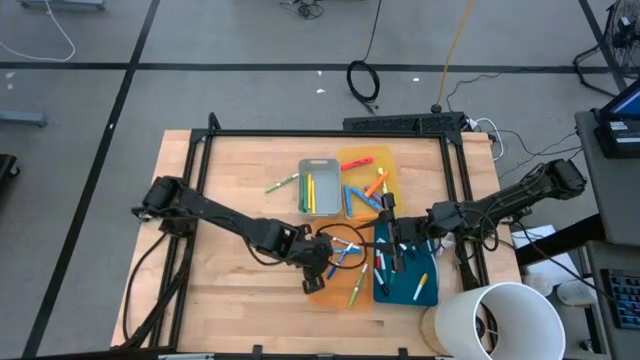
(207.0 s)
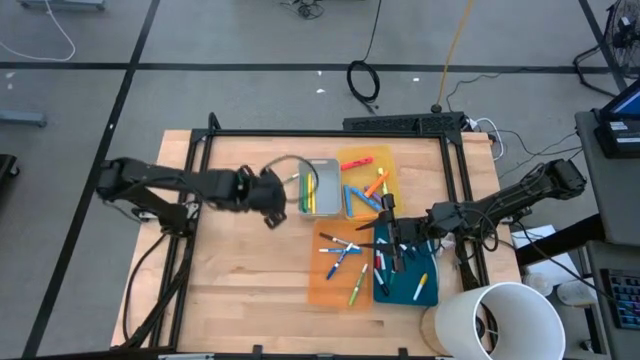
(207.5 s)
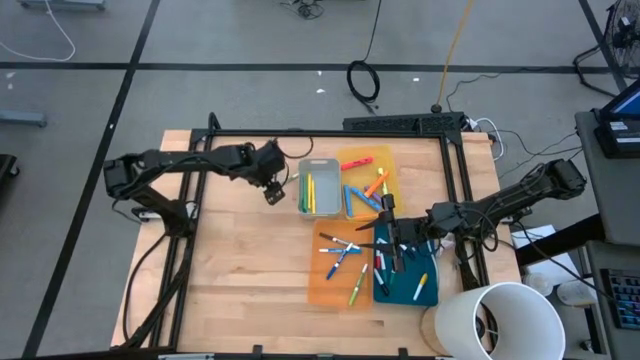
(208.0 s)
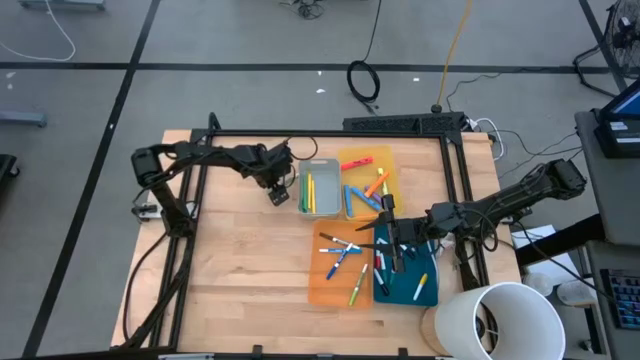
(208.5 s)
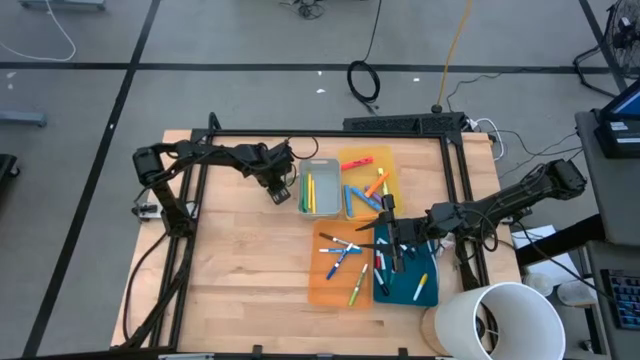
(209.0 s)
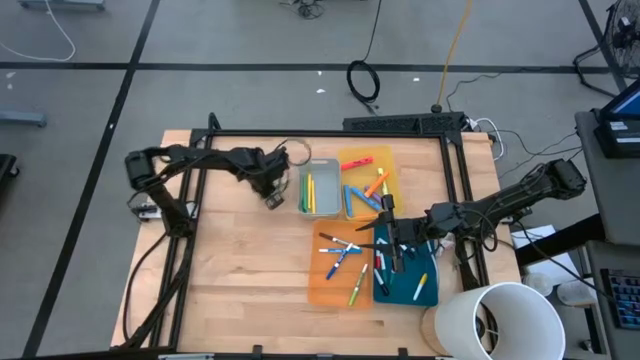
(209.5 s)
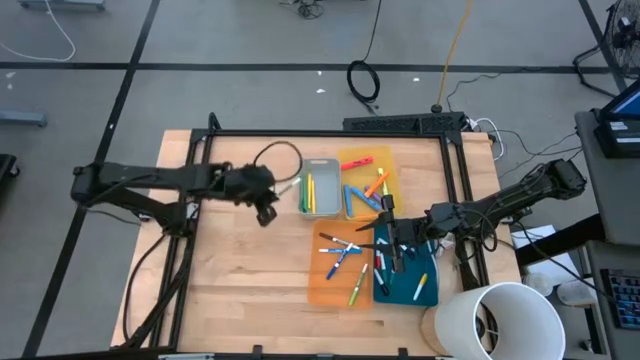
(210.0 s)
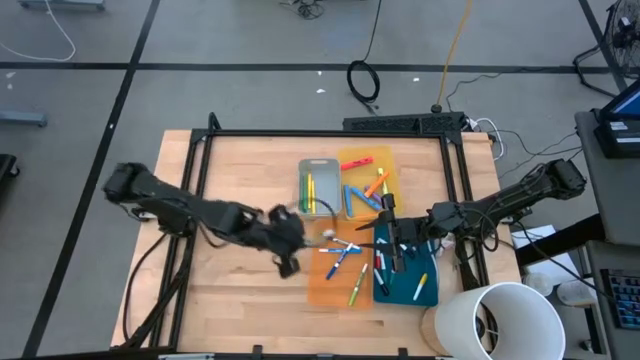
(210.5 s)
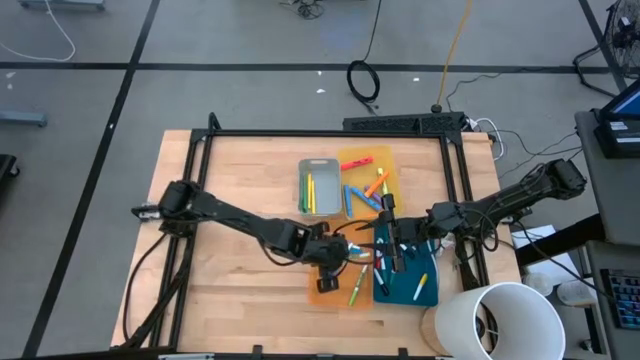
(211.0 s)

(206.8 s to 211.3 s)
Task: Pick & Place Markers
Put the green marker pen into the orange bin

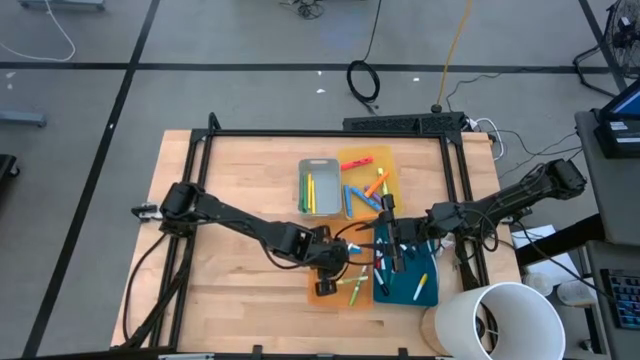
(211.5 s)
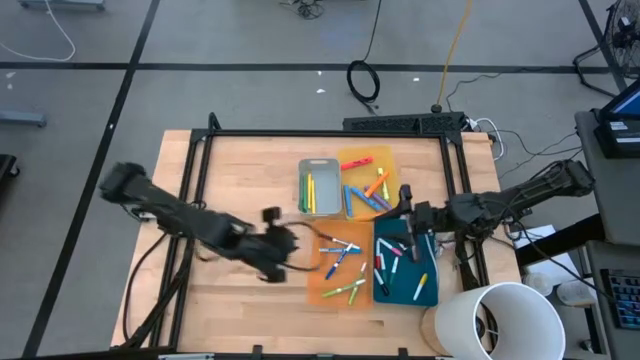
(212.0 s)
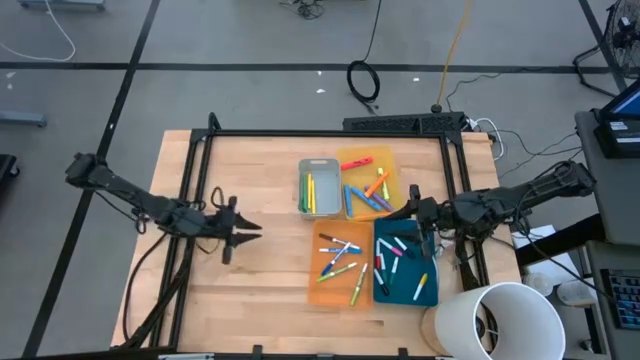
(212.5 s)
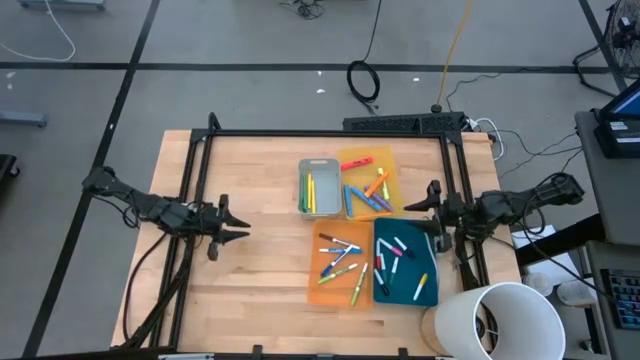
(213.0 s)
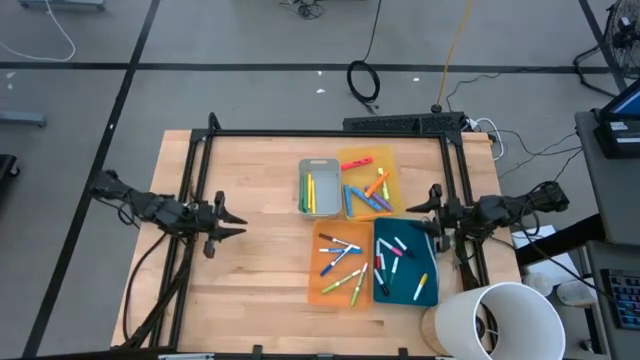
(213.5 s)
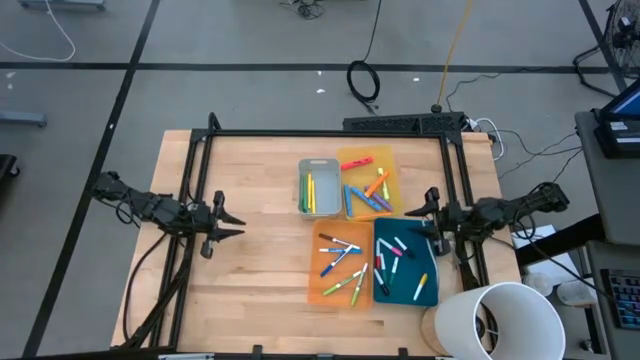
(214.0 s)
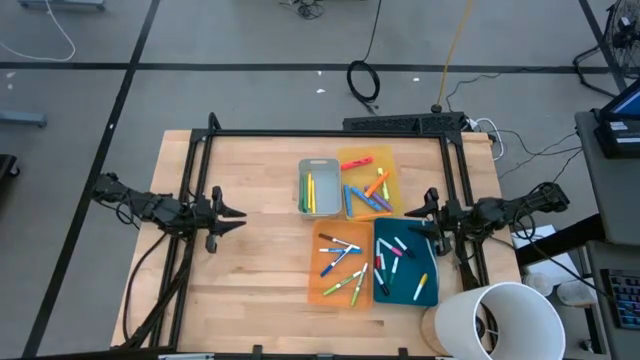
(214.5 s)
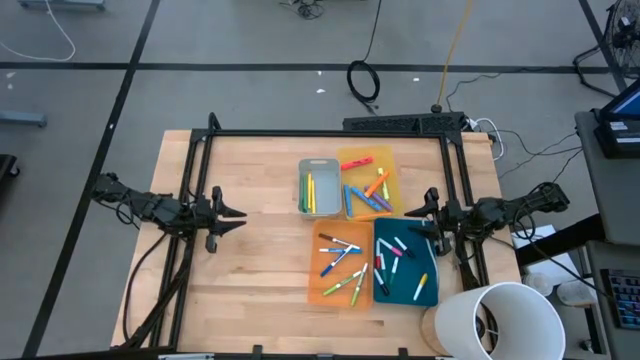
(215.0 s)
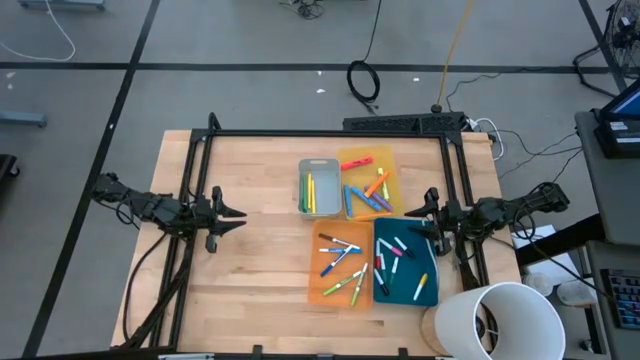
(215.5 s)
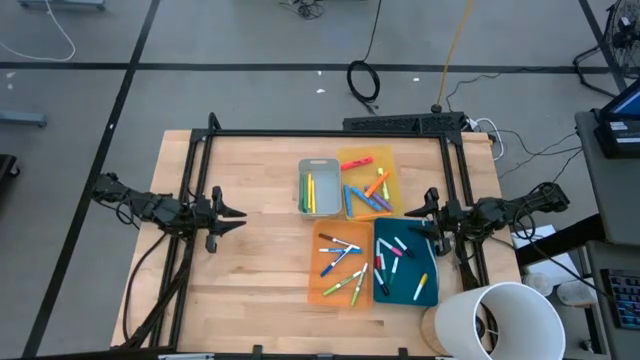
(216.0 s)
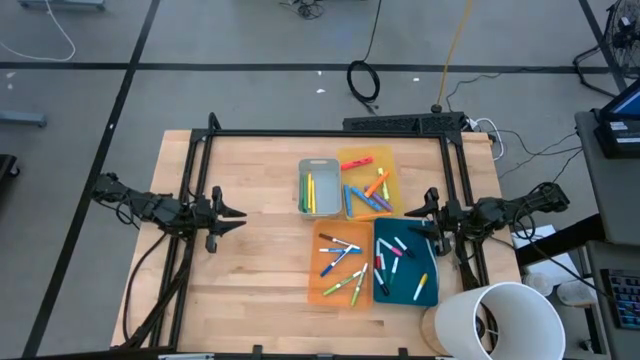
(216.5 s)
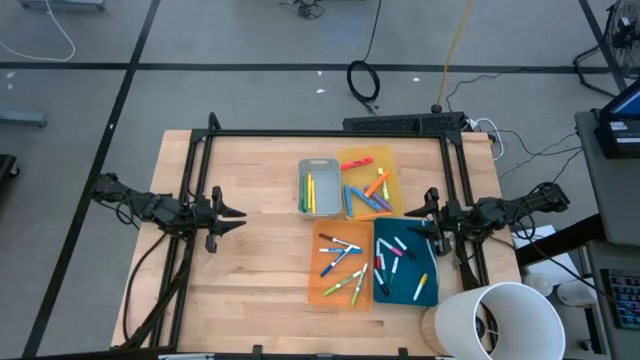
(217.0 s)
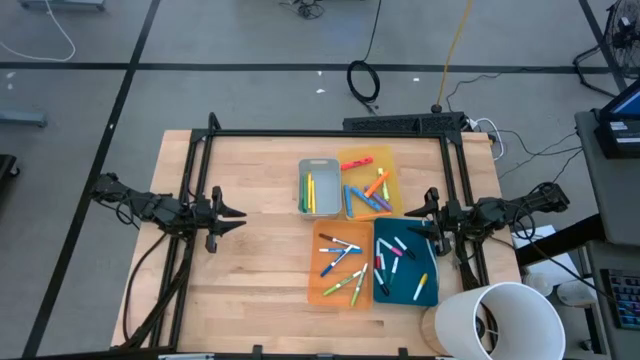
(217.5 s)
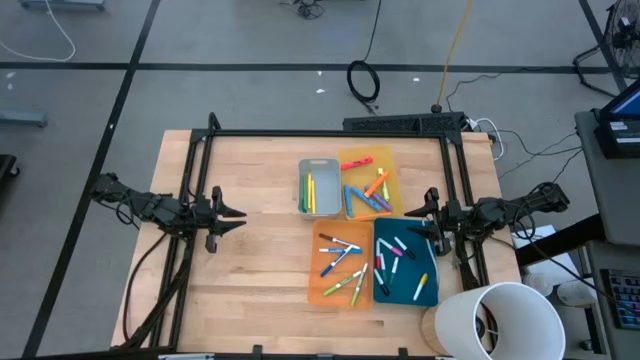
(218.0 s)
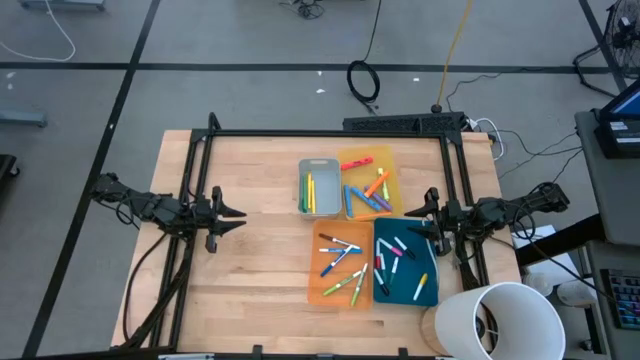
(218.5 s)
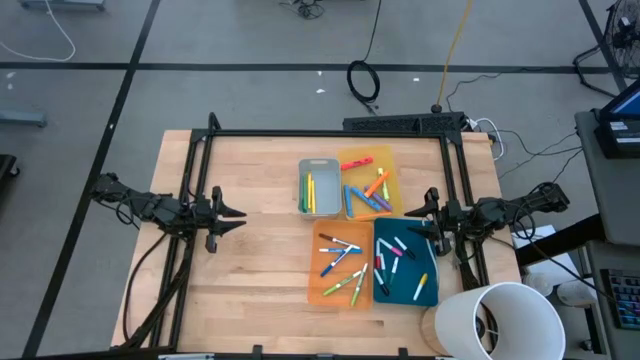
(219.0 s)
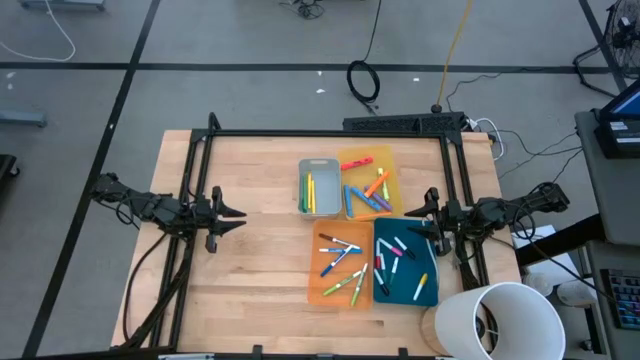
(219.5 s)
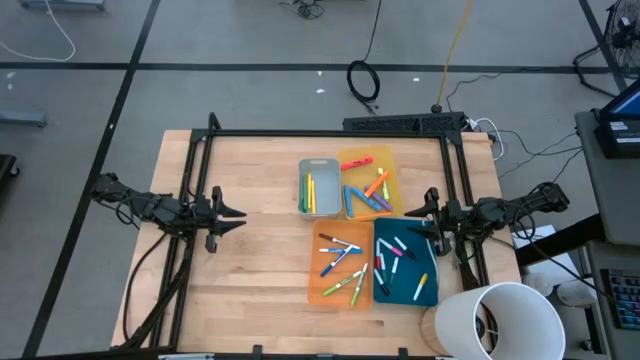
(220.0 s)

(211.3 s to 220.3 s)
Return to Home Position

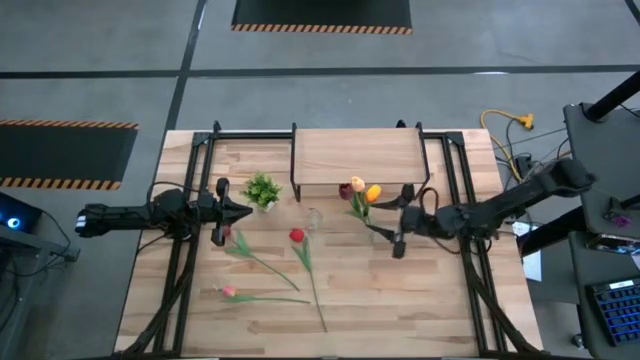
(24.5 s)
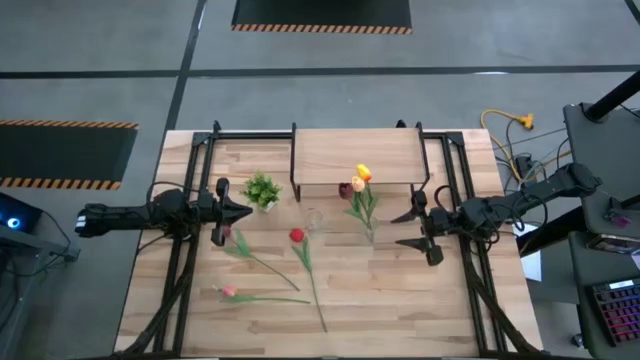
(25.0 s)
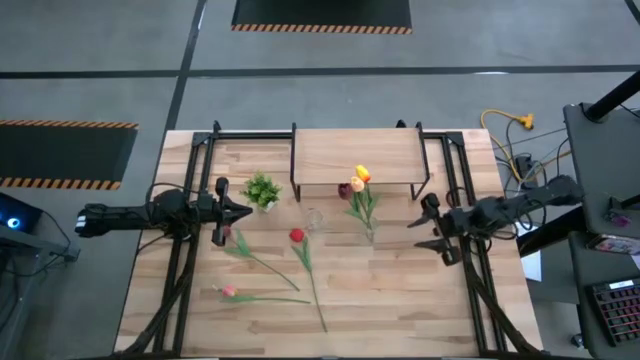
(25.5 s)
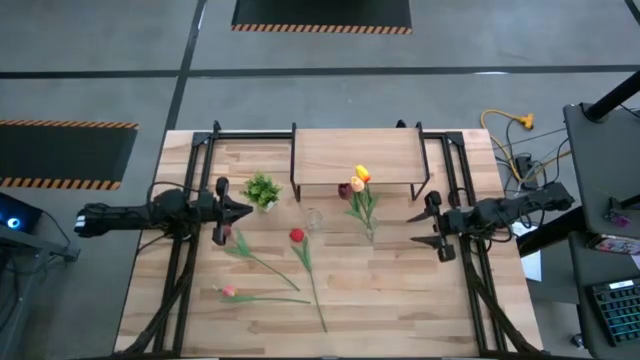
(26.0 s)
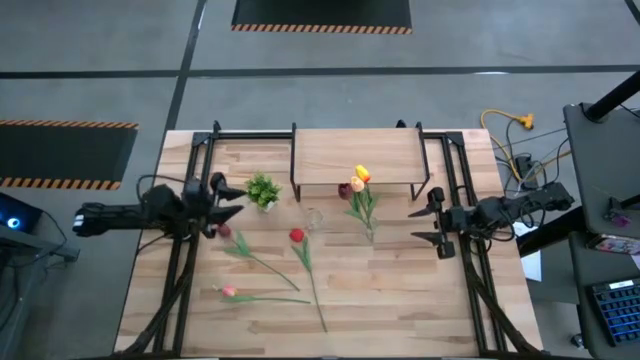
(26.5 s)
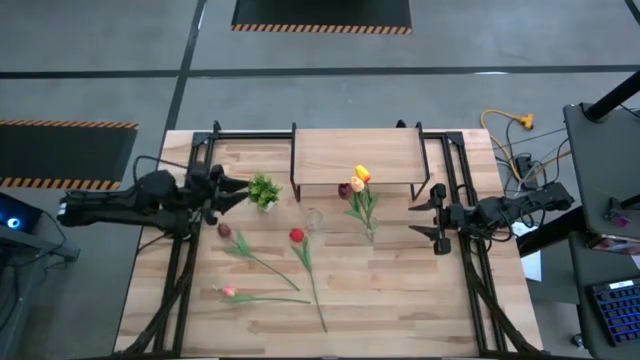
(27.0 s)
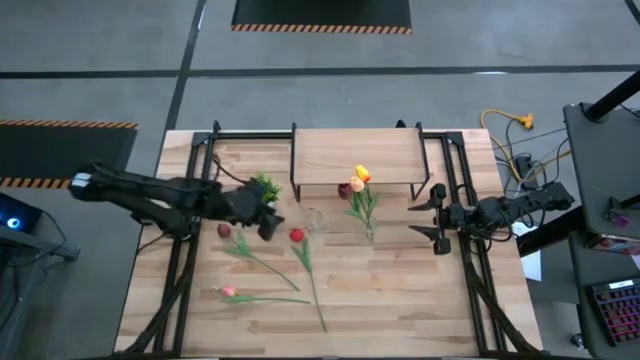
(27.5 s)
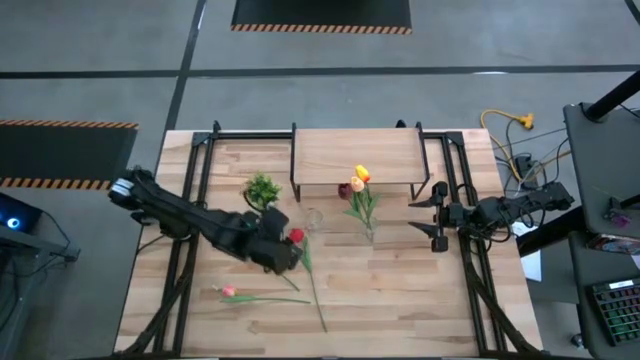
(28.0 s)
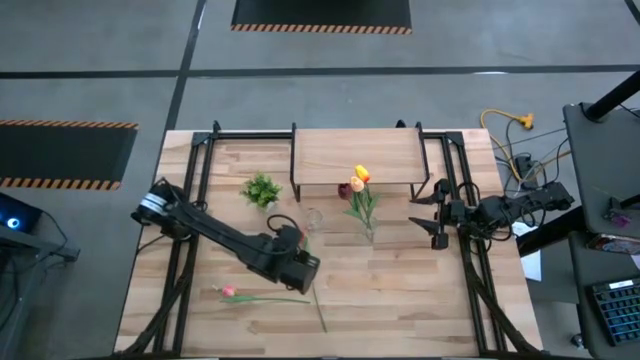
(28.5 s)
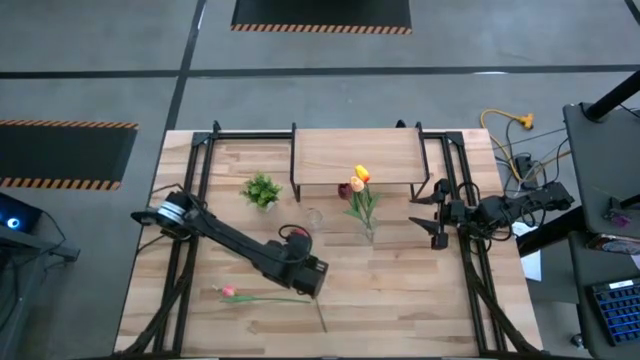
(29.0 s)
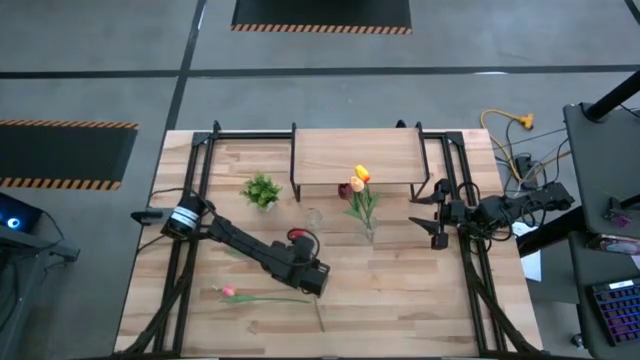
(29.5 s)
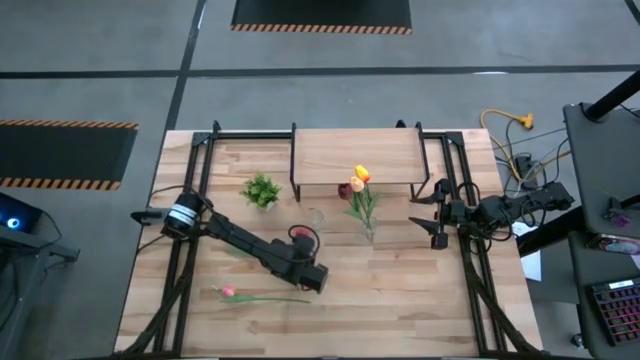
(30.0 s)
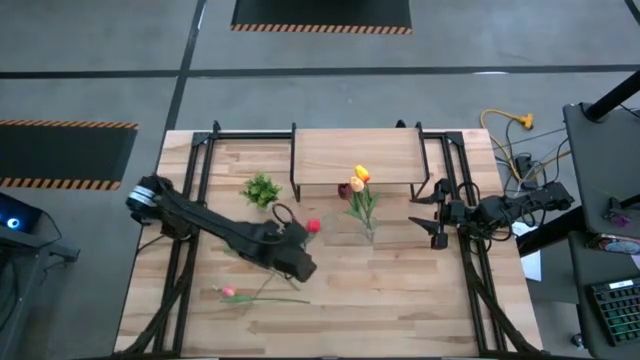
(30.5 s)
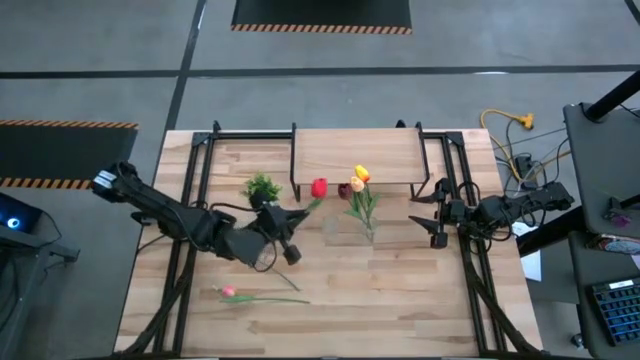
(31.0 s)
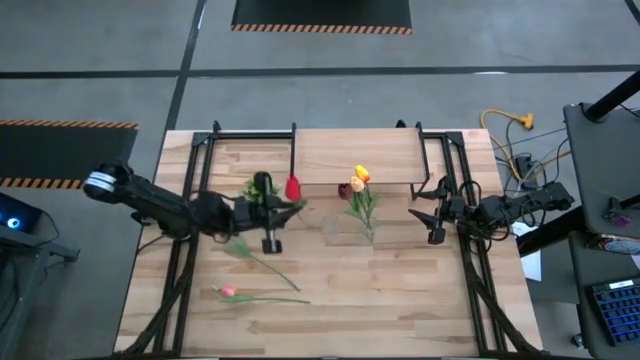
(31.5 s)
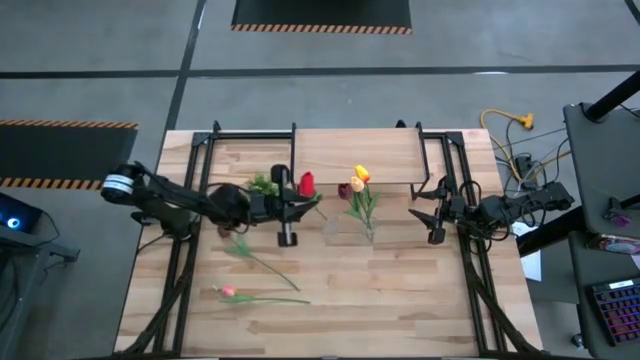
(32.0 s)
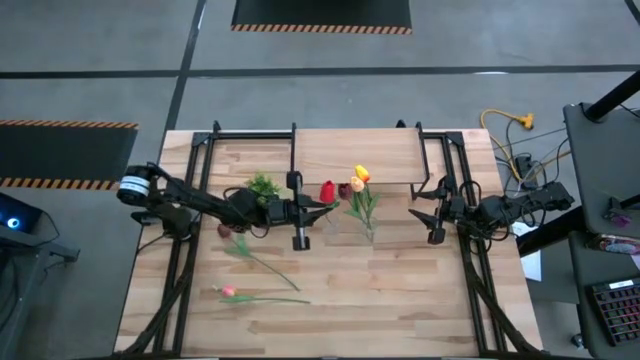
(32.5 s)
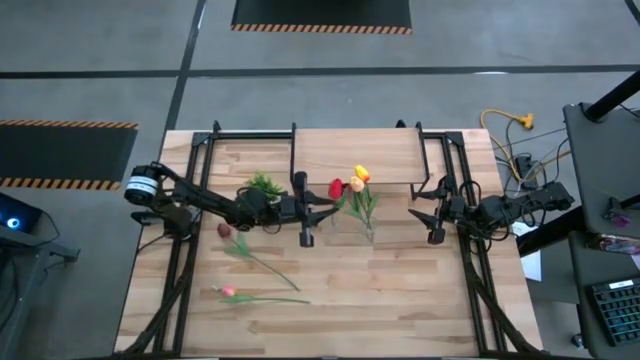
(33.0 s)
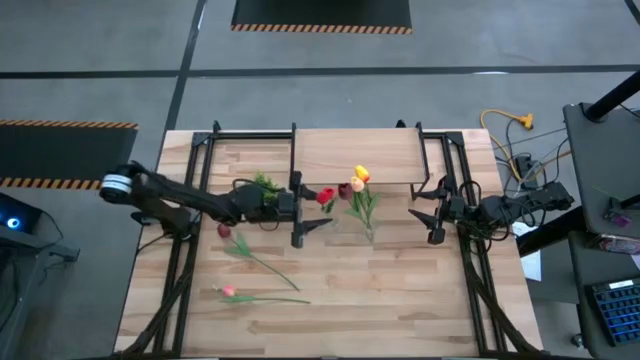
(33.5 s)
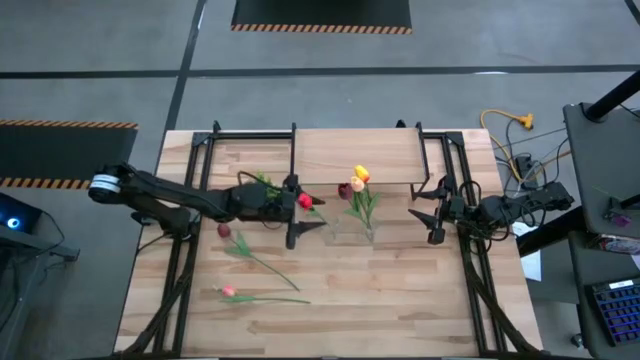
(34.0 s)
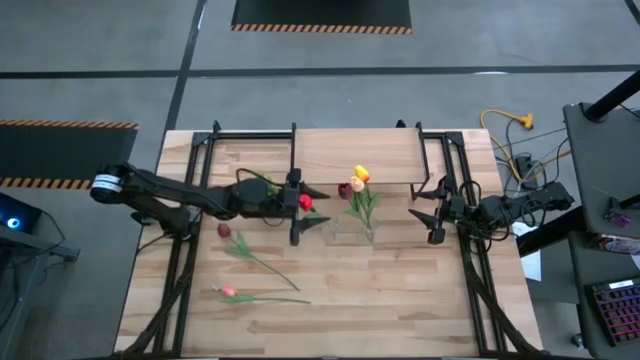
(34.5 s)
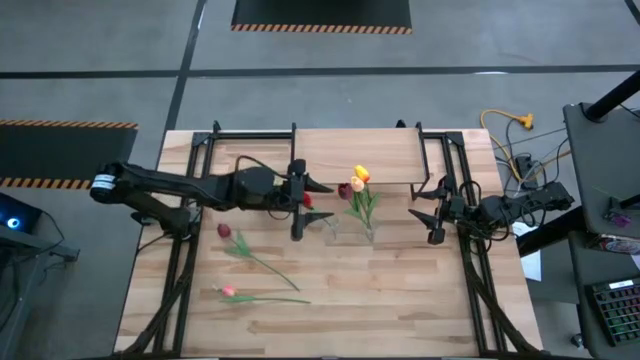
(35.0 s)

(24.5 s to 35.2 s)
Task: Pick and place flowers into a vace then onto a shelf
Put the red tulip into the left transparent vase
